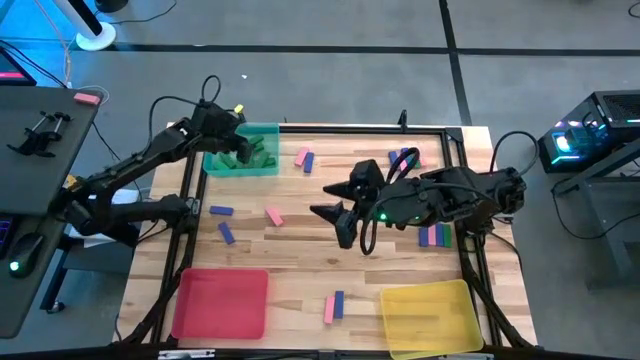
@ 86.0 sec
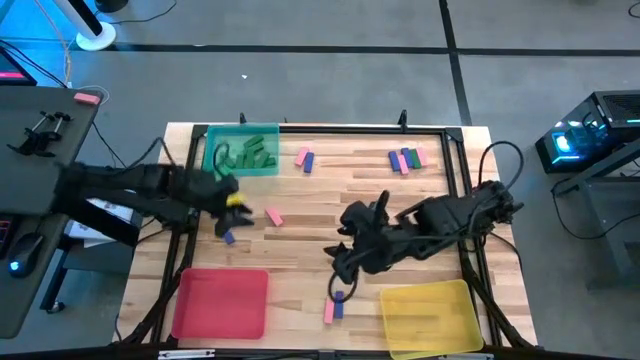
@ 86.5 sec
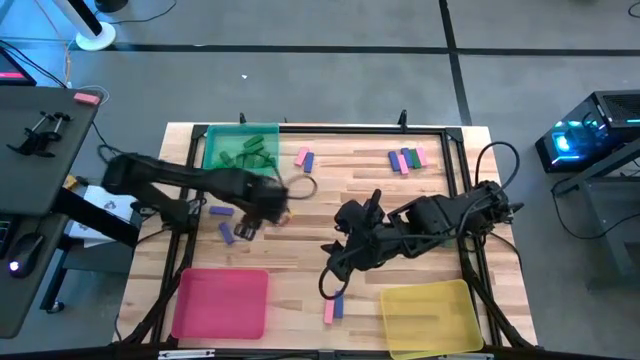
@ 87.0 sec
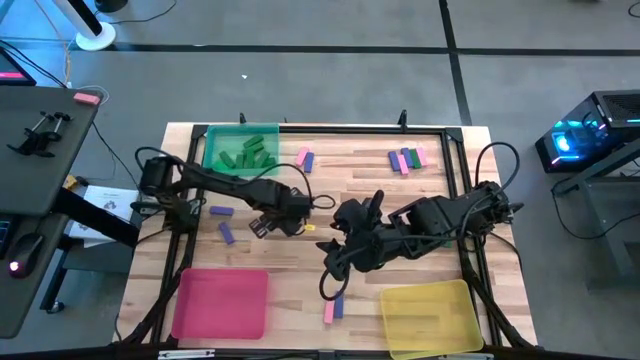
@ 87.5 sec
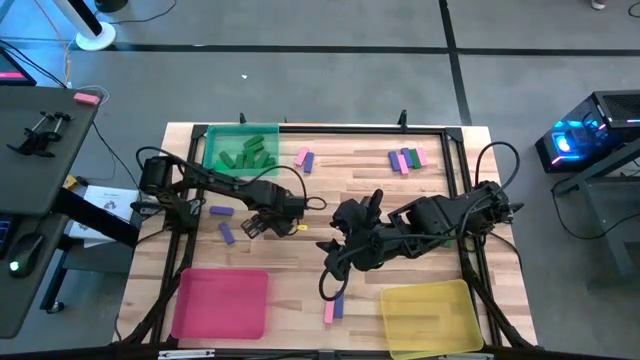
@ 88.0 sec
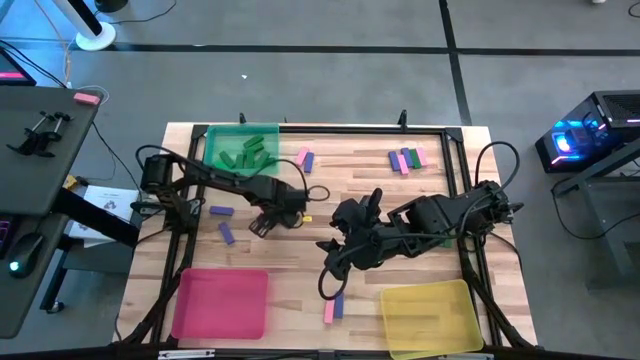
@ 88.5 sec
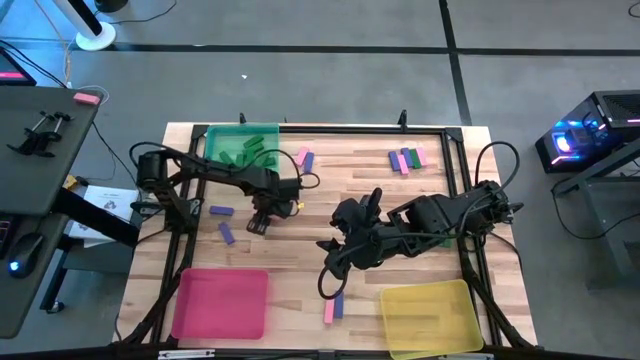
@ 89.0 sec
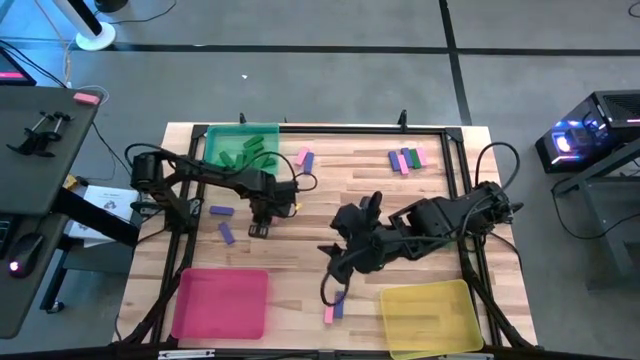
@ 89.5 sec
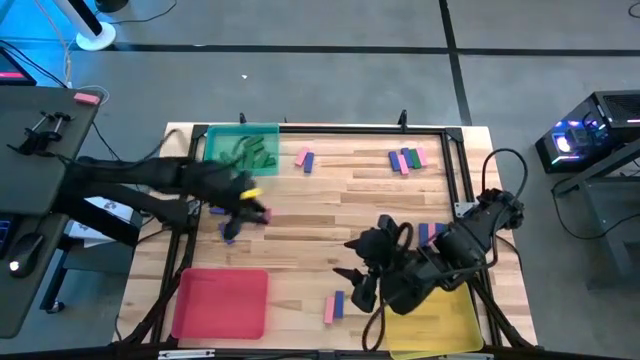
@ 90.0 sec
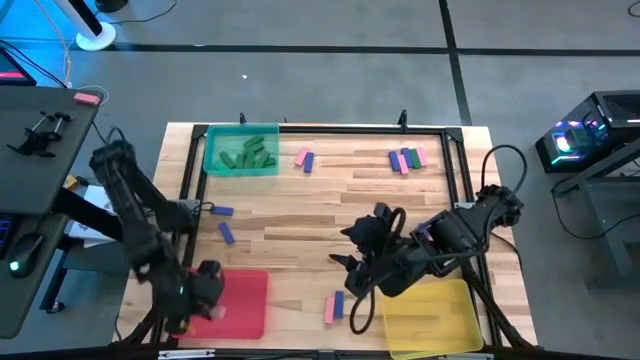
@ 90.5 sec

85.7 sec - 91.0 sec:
Task: Sort blocks
Put the pink block into the pink bin

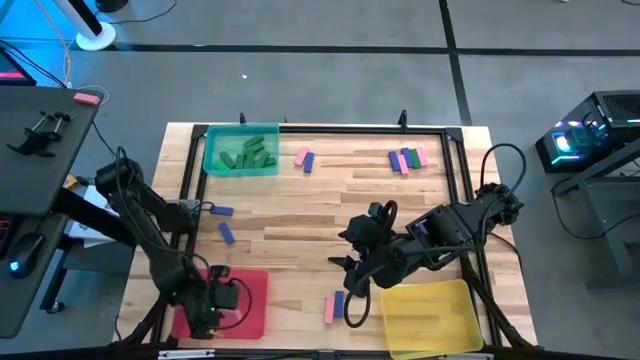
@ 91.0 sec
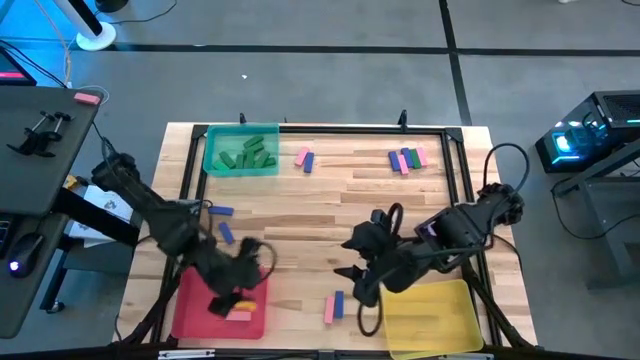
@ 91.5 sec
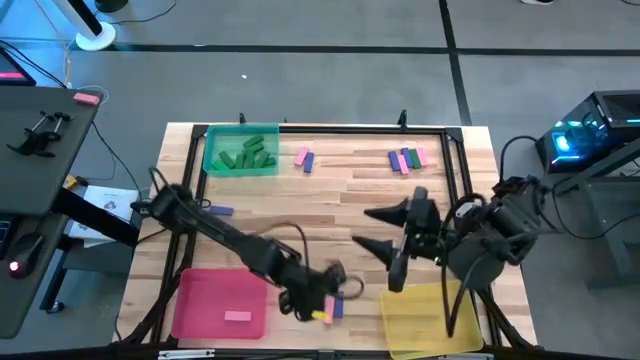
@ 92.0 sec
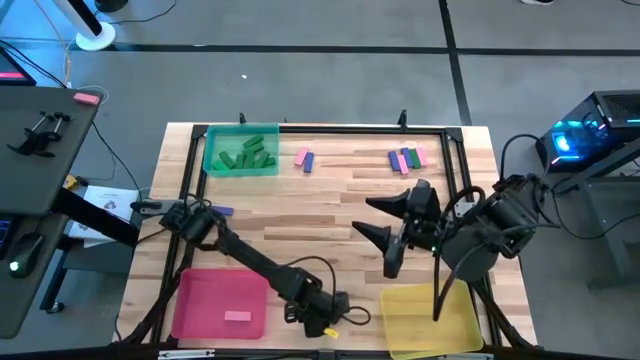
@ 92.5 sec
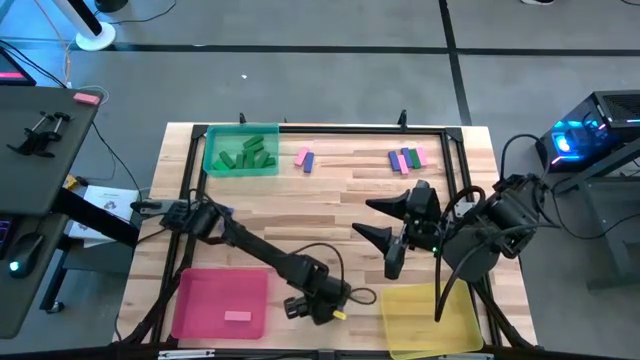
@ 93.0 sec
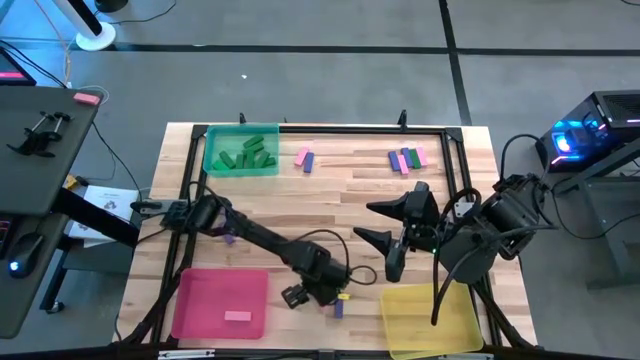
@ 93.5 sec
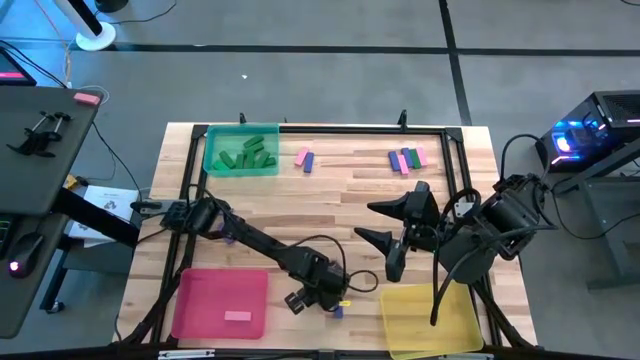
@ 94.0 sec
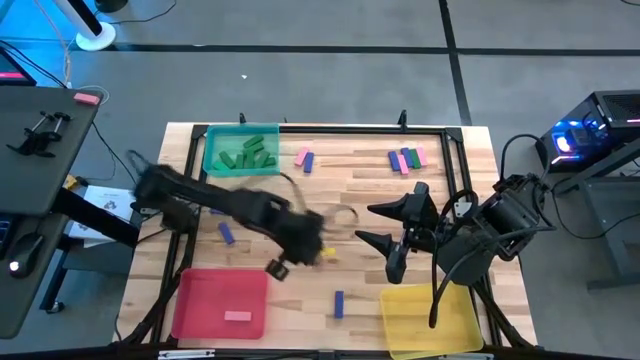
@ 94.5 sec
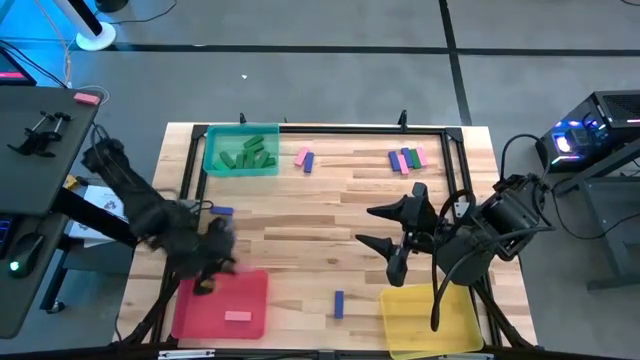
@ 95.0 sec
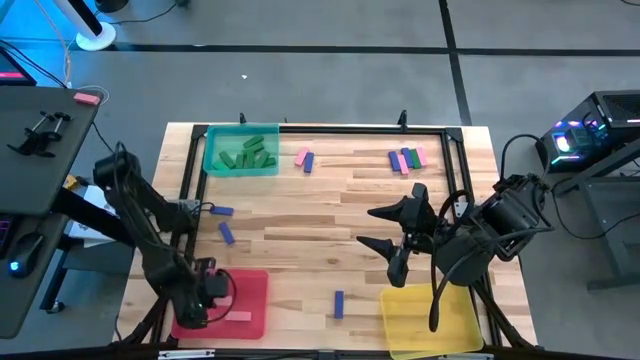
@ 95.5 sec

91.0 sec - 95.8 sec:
Put the pink block into the pink bin

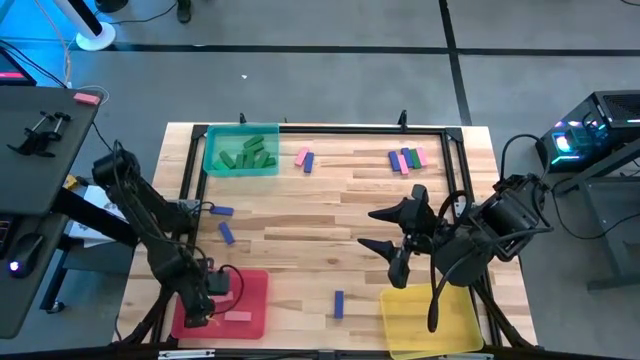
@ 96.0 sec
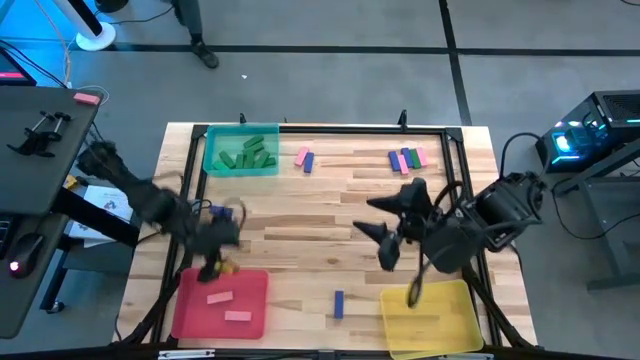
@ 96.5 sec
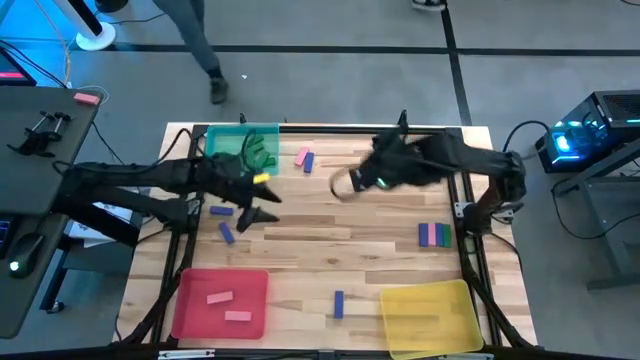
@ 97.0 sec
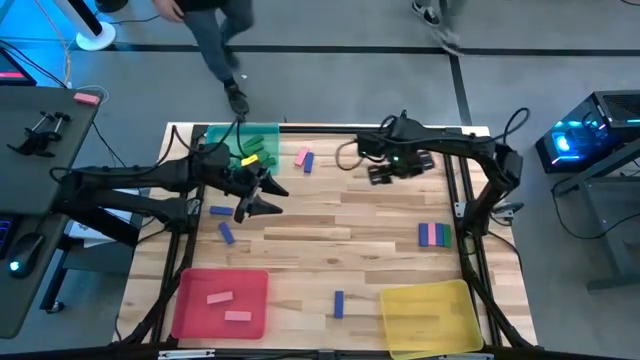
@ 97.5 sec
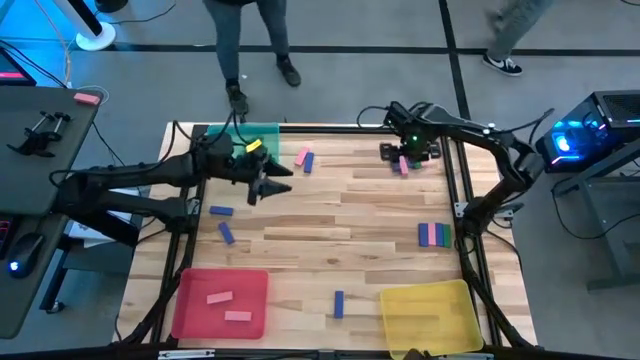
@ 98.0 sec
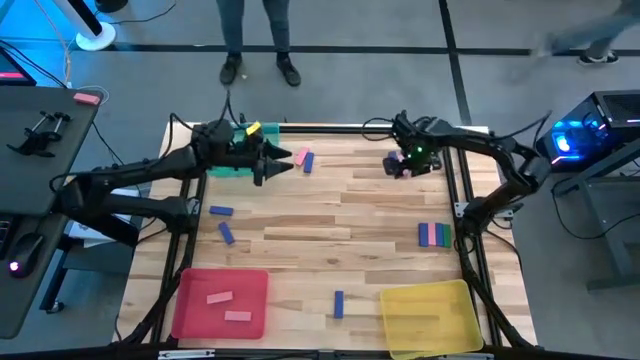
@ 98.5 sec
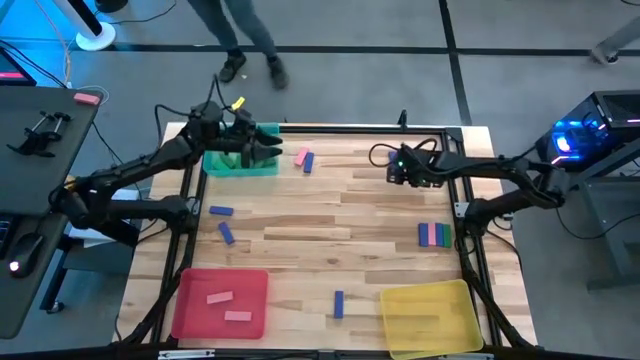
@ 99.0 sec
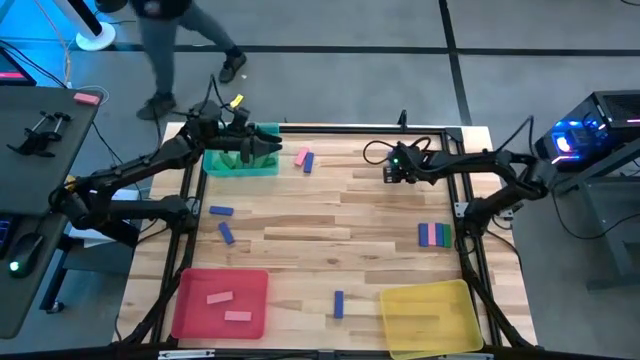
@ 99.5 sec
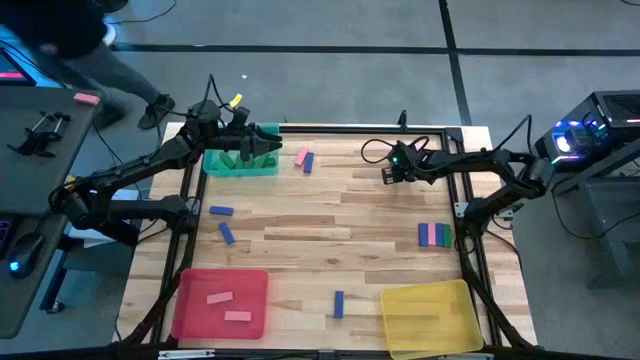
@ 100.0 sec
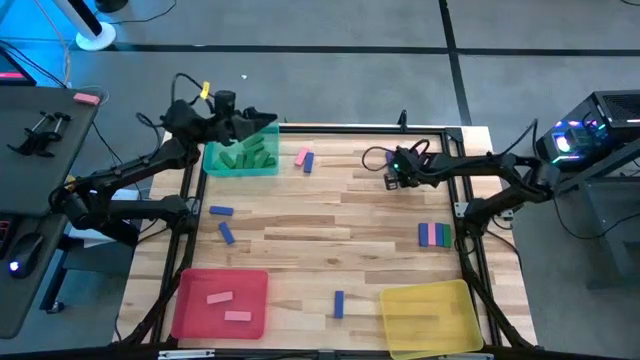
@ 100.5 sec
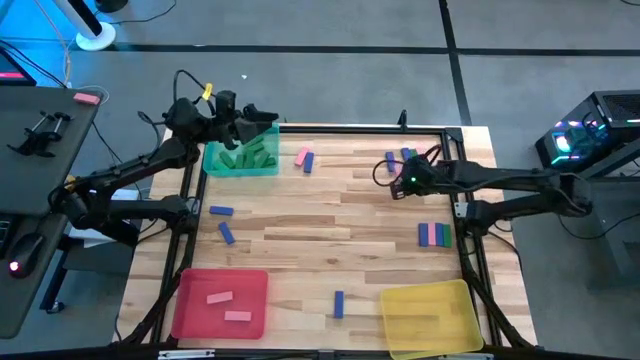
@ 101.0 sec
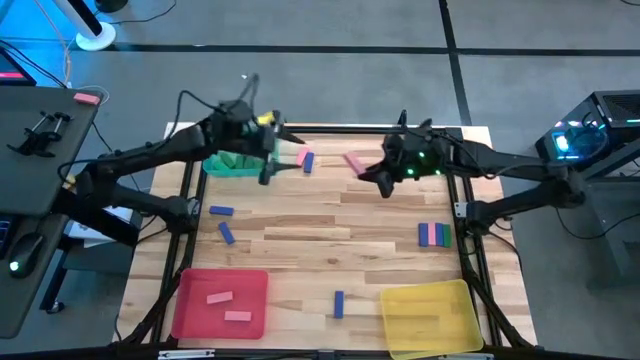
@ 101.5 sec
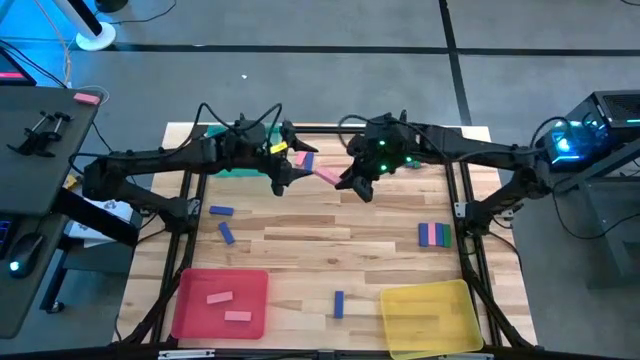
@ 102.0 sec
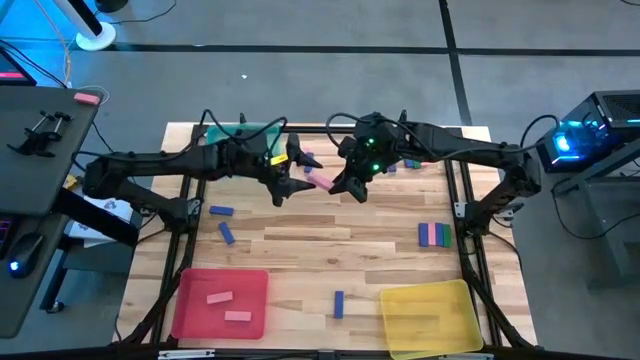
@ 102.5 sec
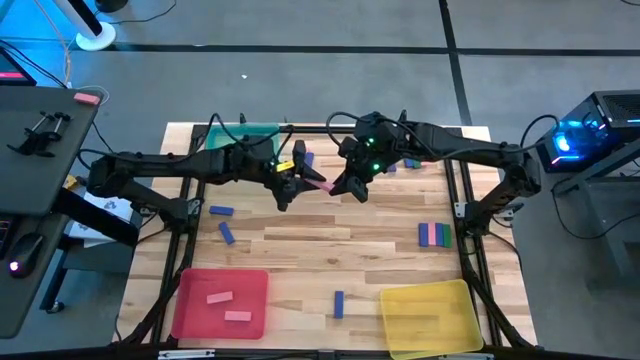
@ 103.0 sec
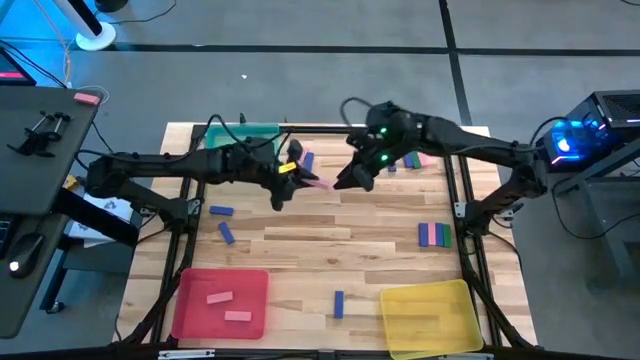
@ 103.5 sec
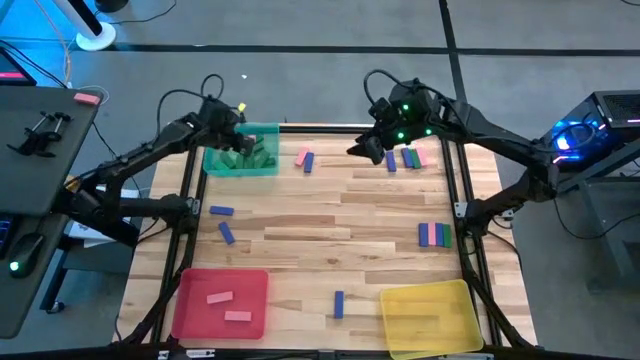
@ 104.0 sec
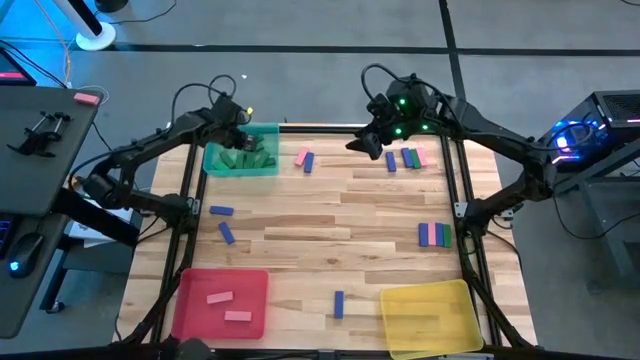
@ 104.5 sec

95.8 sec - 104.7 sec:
Put the pink block into the pink bin

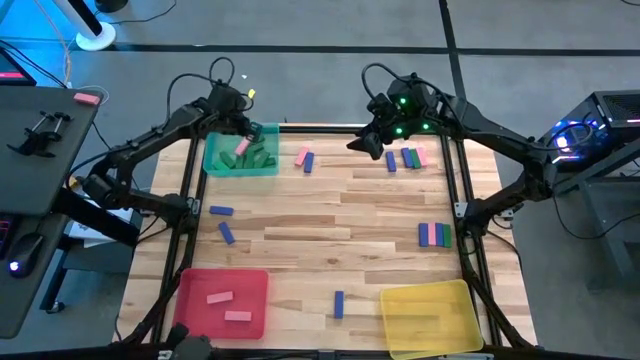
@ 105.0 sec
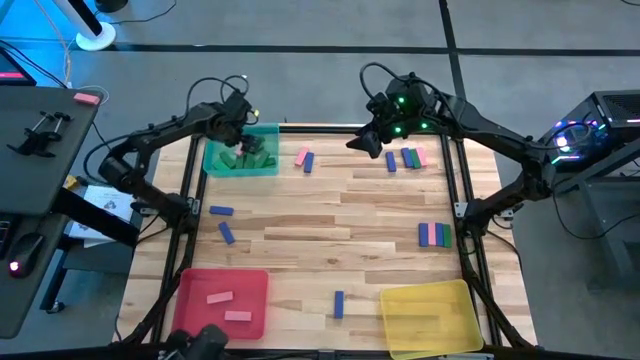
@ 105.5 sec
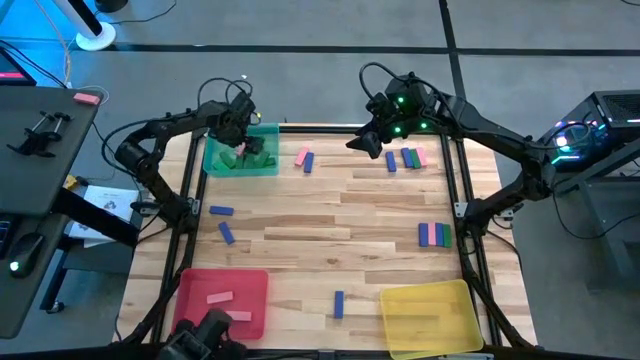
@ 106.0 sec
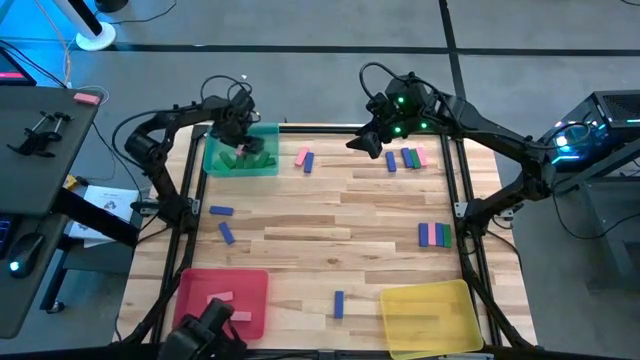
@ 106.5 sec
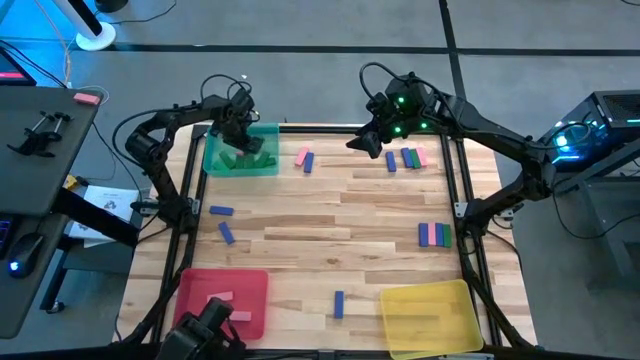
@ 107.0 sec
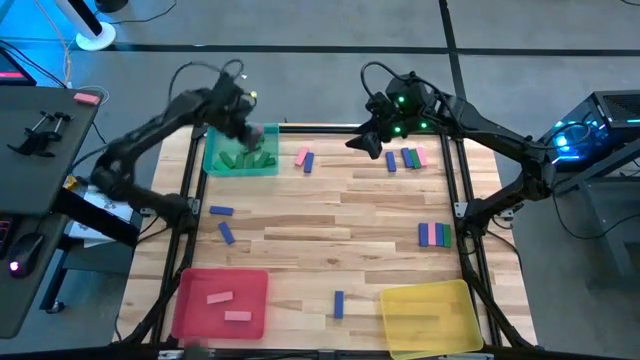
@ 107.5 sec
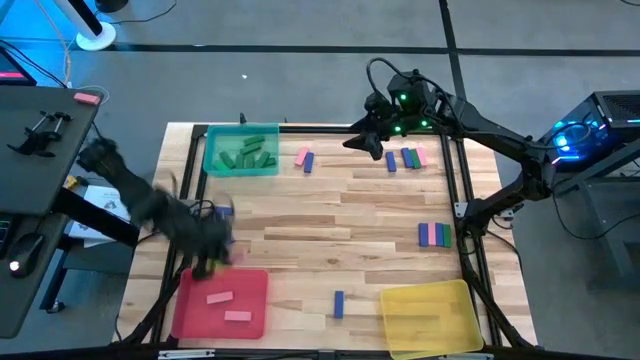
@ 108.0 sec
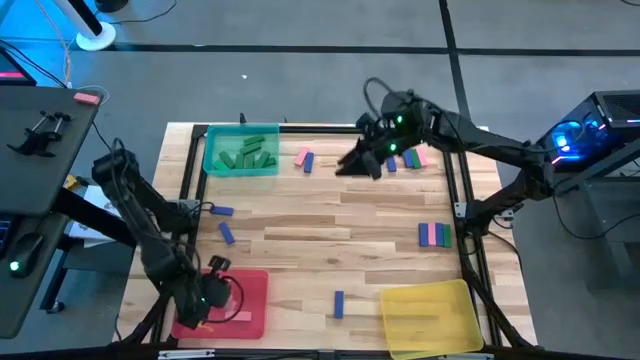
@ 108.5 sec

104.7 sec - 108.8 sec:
Put the pink block into the pink bin
